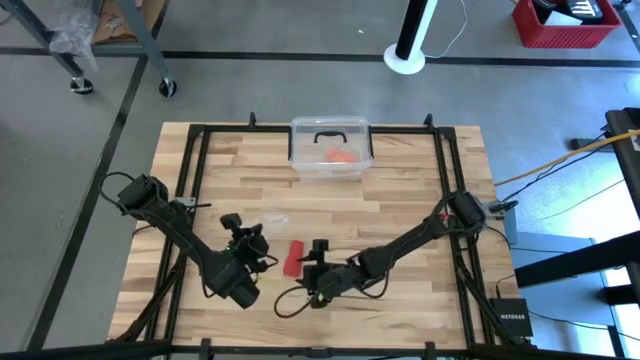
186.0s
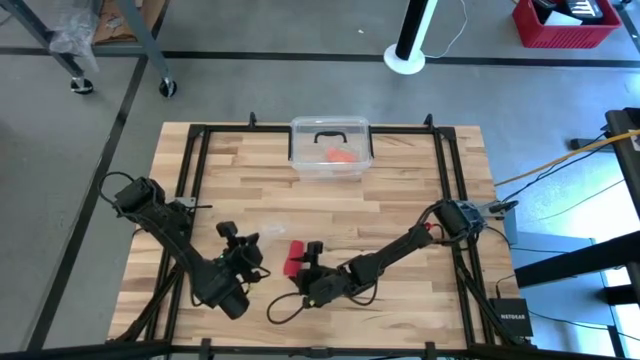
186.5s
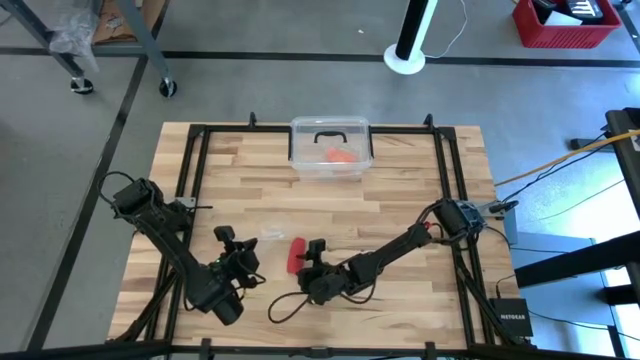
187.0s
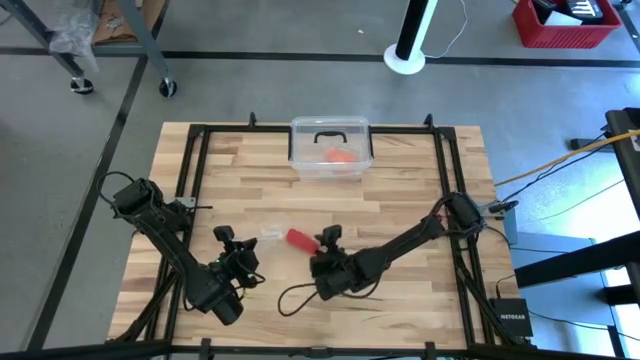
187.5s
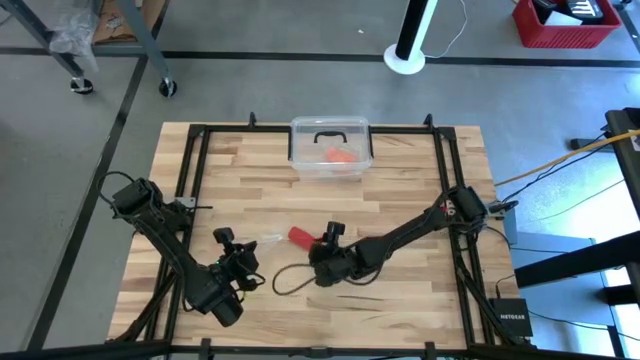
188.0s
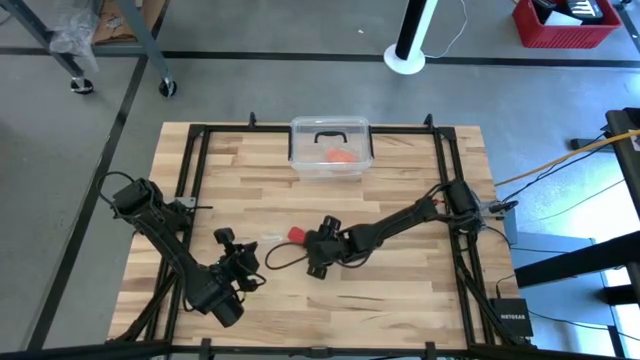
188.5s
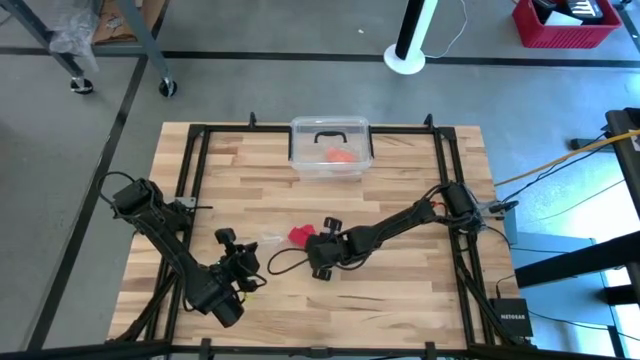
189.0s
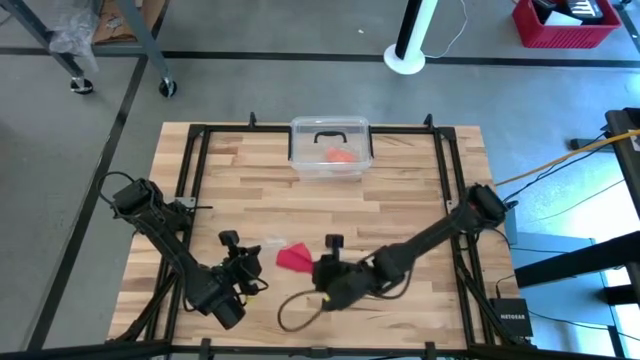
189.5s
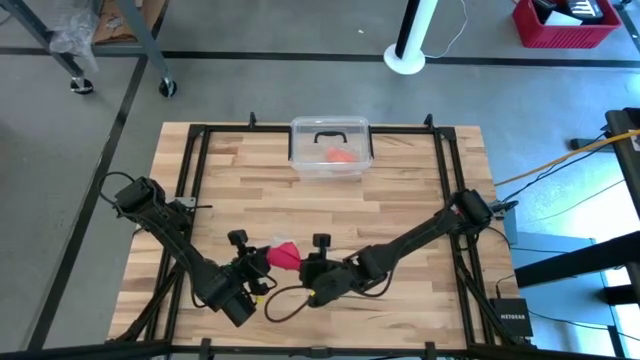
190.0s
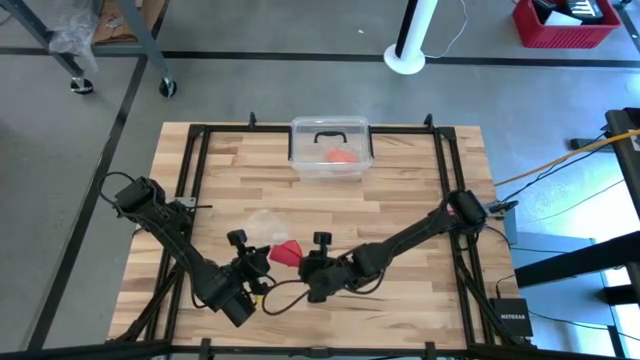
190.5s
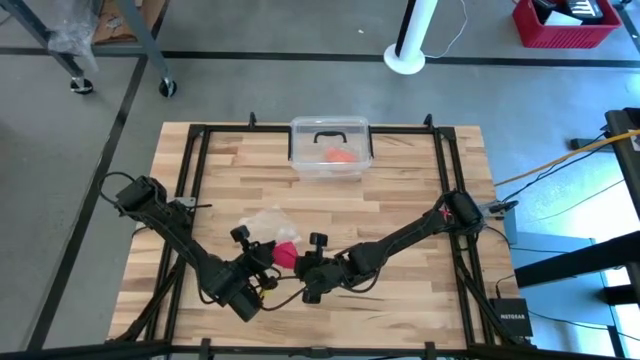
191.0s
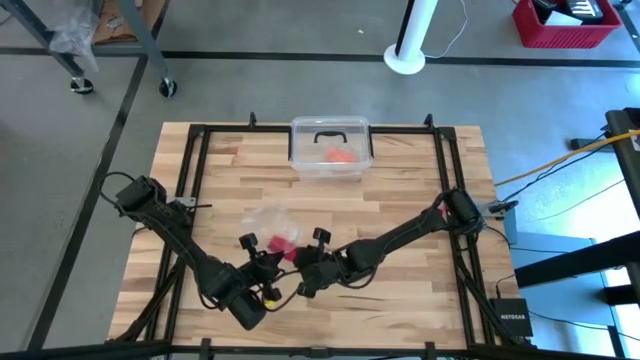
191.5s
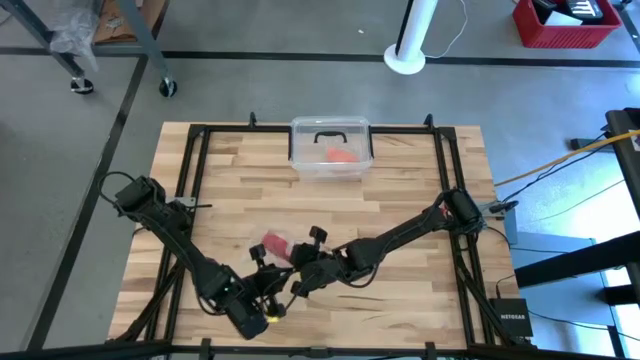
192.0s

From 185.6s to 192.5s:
Task: Roll bandage
Put the rolled red bandage into the transparent zip bag

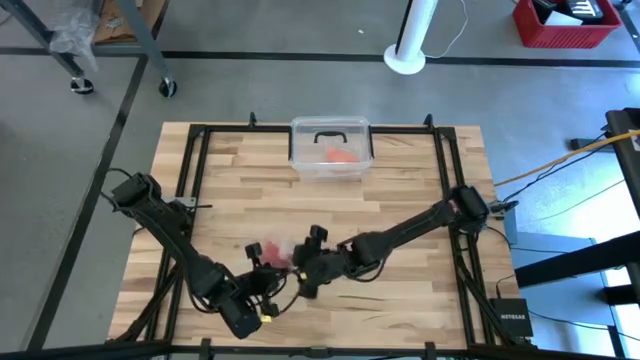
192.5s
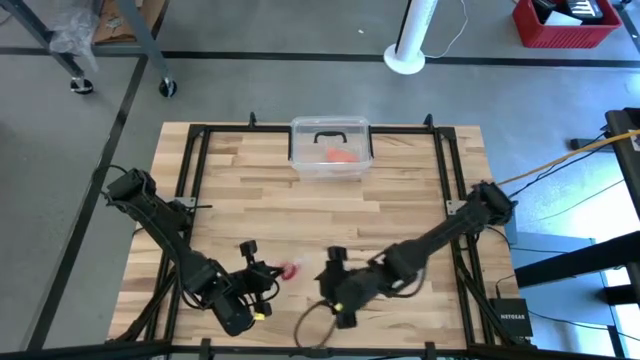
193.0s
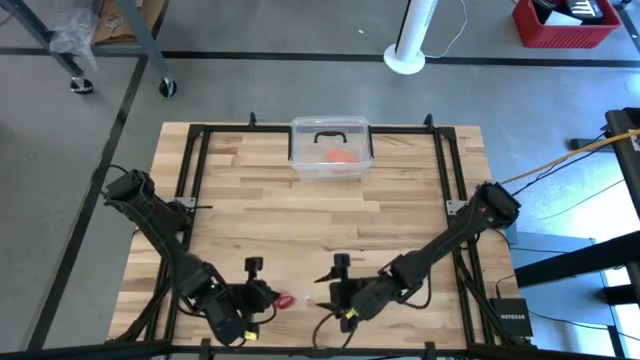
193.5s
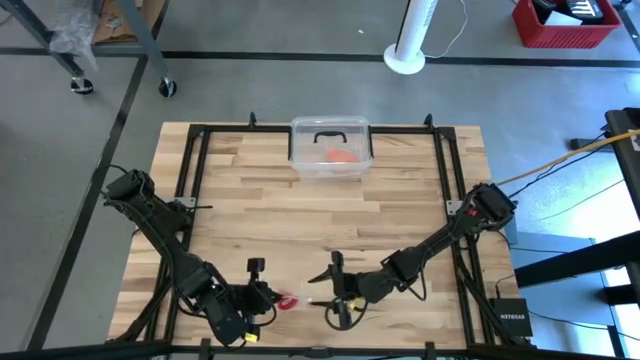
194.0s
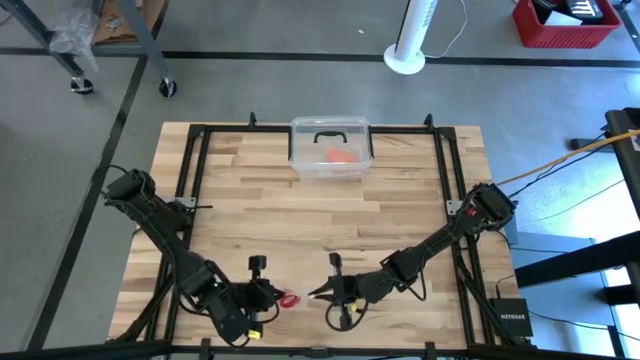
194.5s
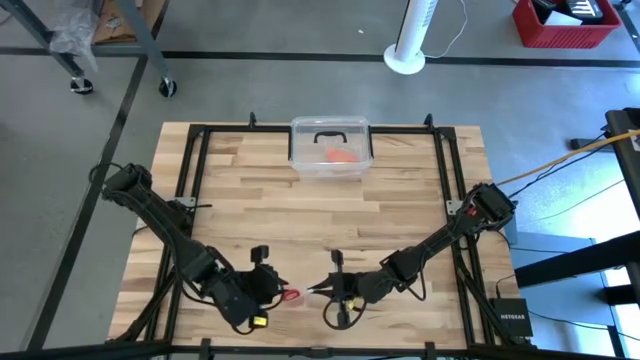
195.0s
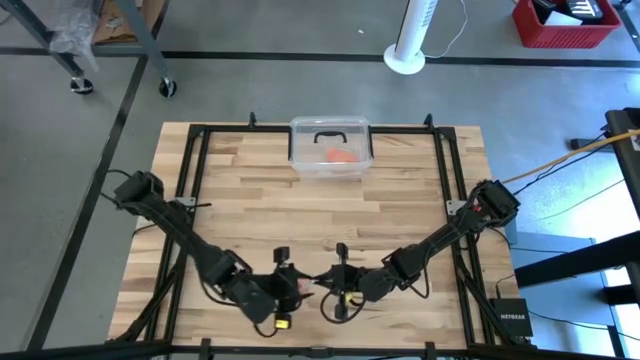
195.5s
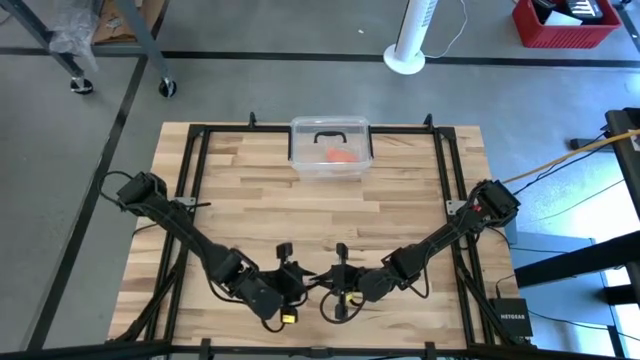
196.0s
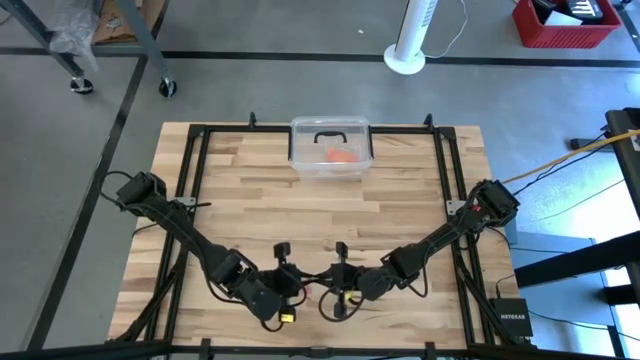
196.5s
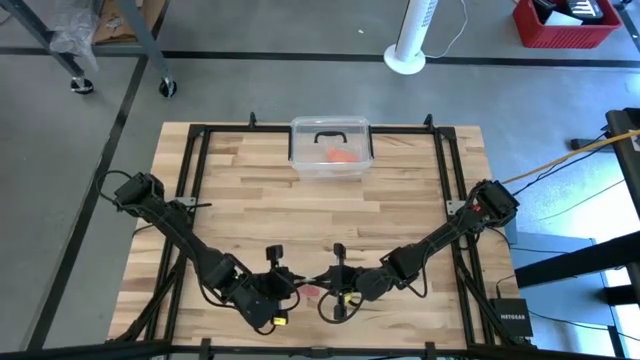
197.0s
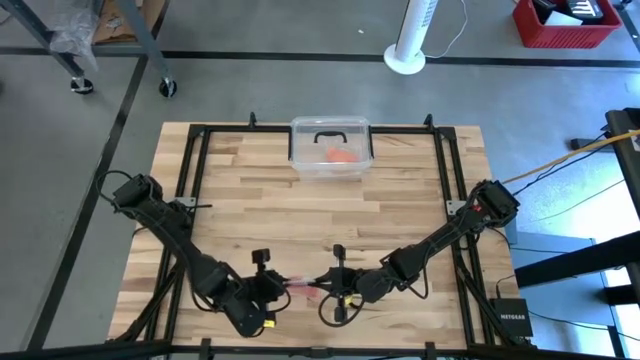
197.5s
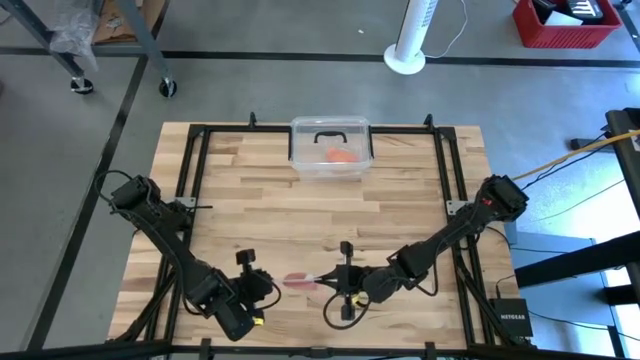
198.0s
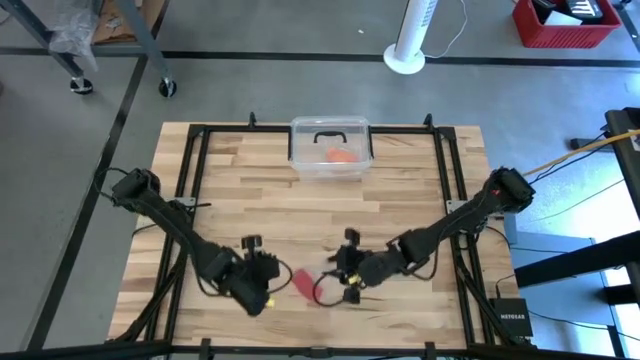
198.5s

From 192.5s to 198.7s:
Close the transparent zip bag

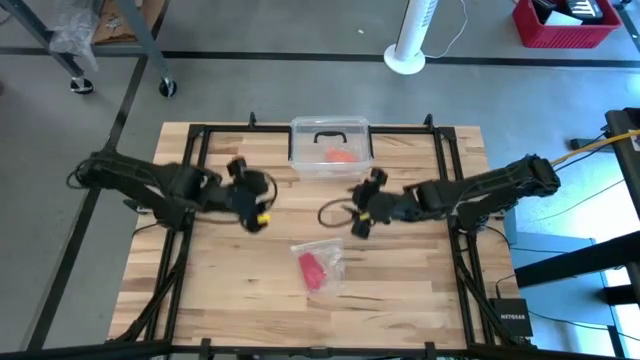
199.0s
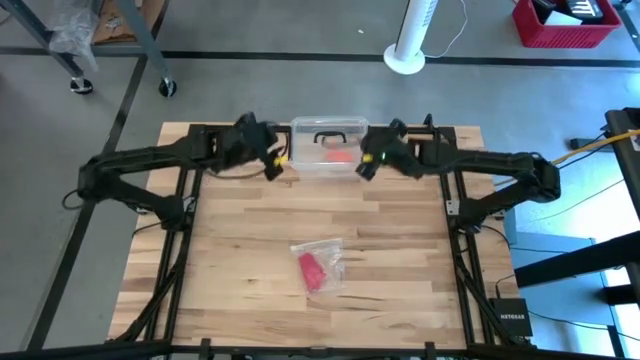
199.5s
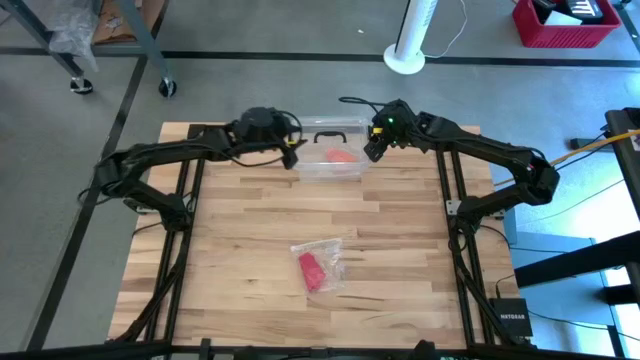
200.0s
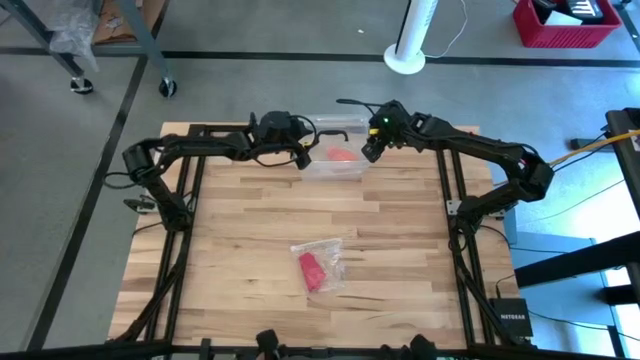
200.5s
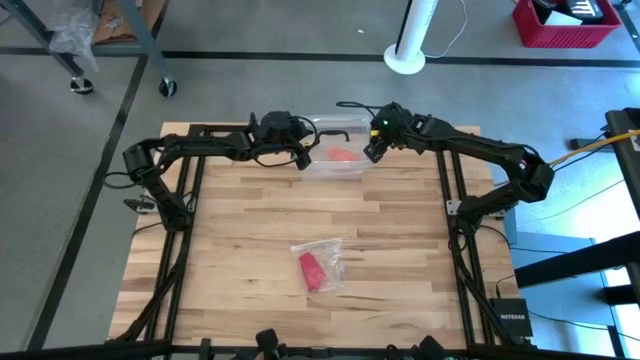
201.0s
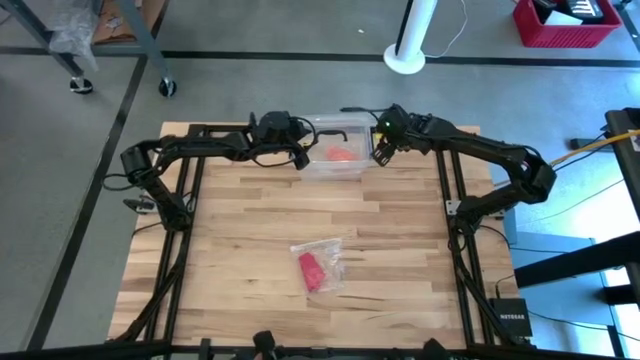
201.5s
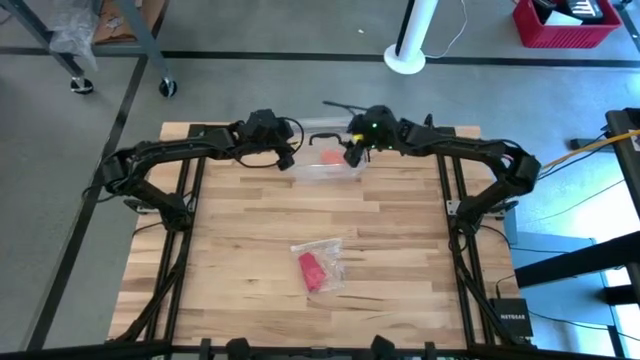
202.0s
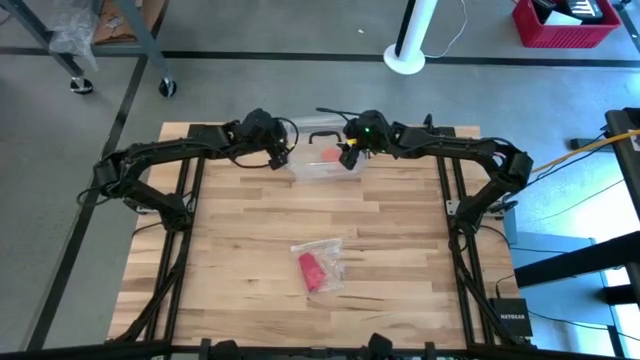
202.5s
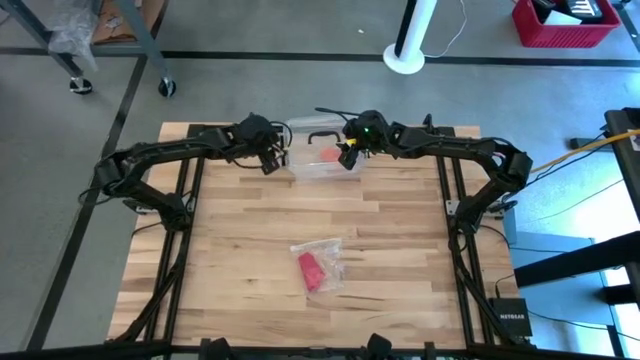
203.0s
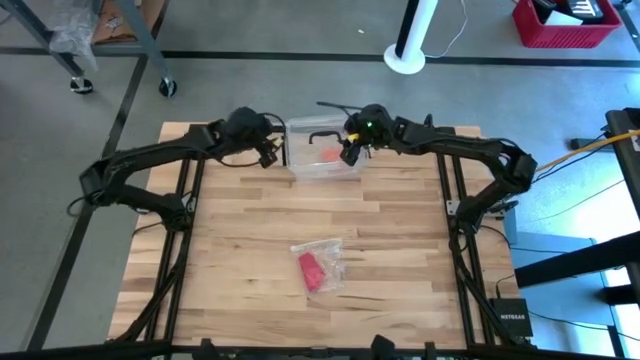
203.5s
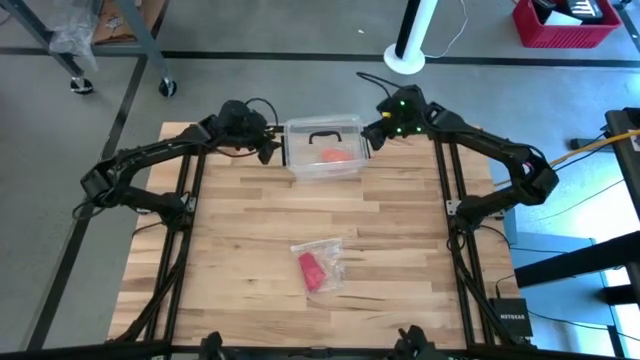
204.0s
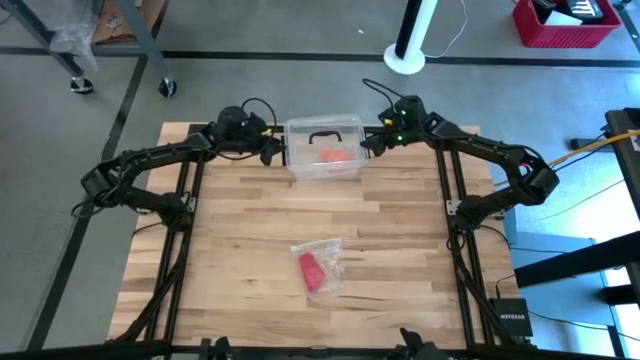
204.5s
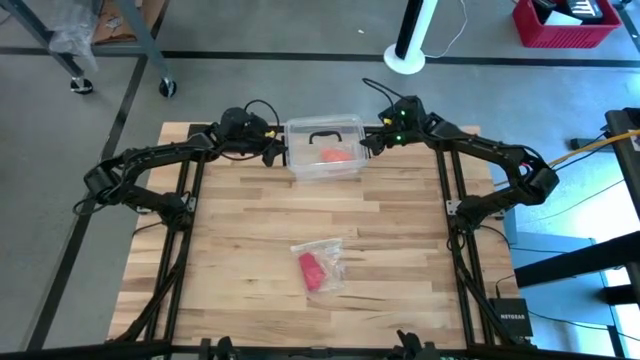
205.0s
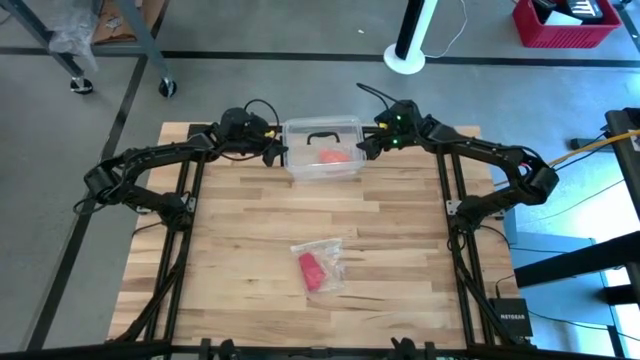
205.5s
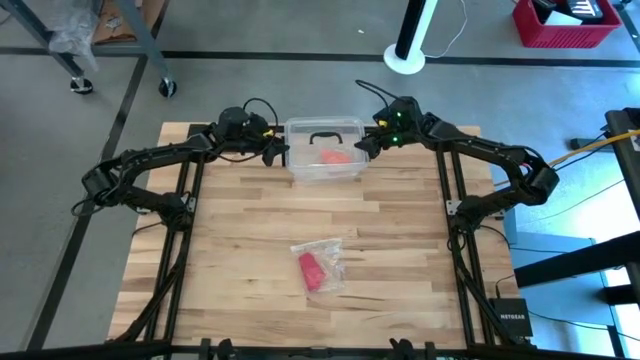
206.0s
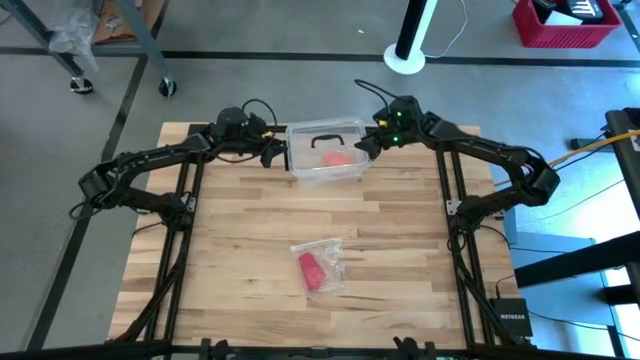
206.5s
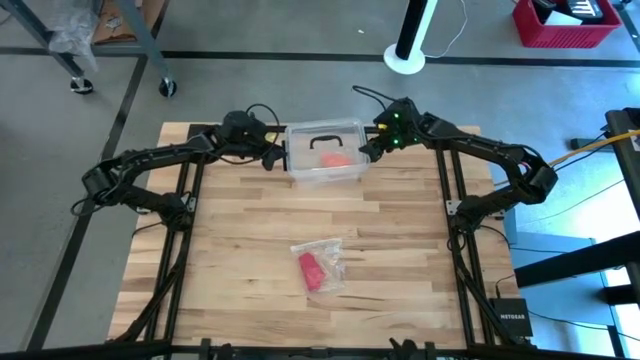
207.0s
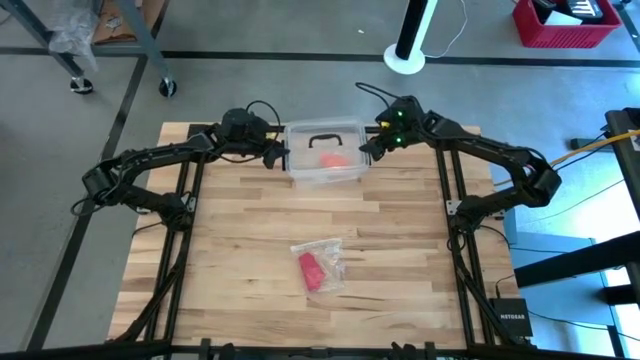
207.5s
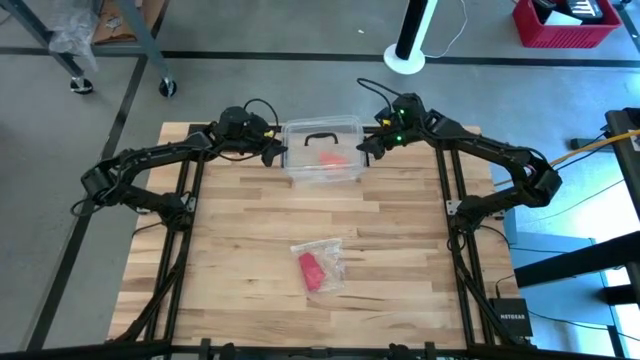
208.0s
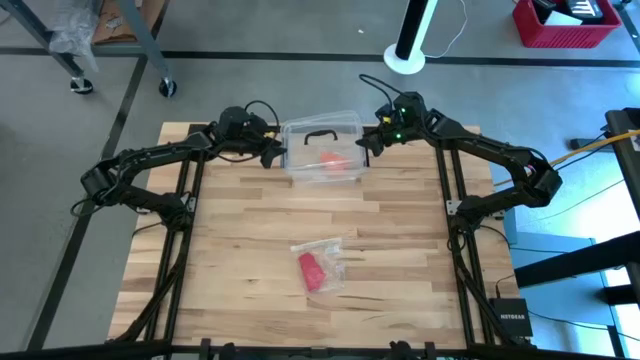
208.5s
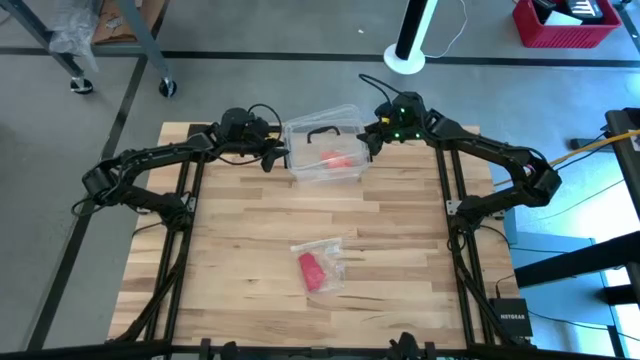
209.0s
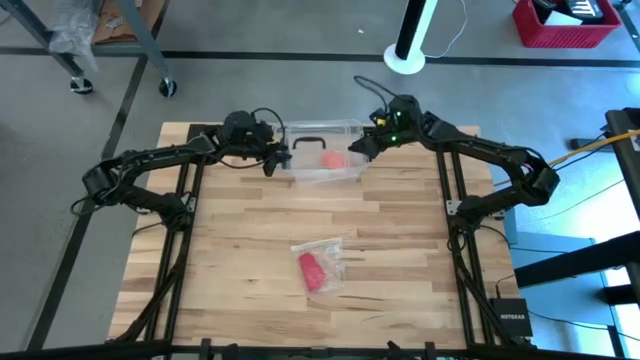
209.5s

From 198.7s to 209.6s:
Open the lid of the transparent container
